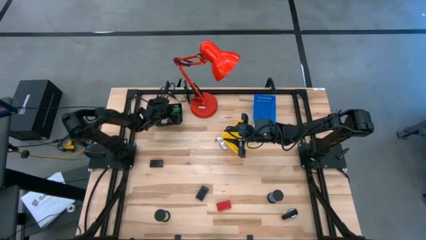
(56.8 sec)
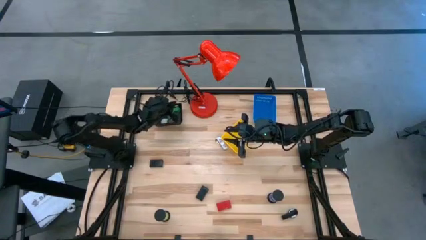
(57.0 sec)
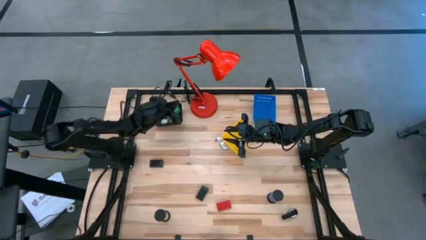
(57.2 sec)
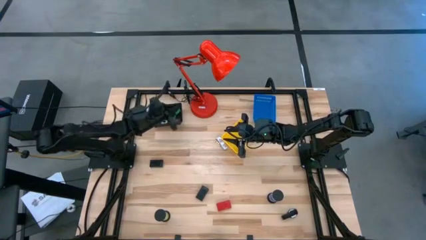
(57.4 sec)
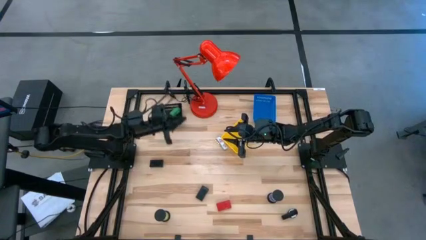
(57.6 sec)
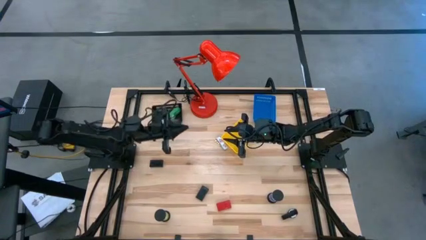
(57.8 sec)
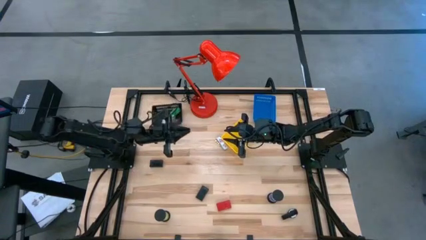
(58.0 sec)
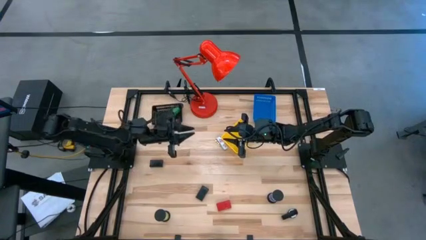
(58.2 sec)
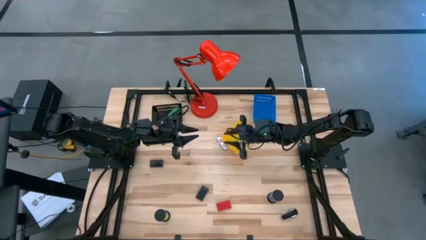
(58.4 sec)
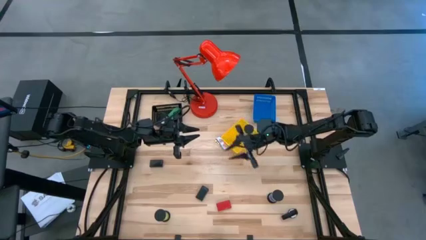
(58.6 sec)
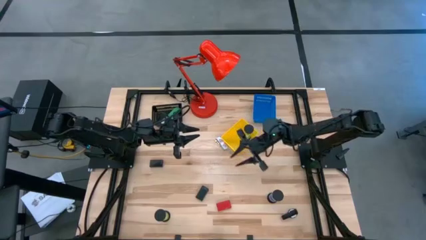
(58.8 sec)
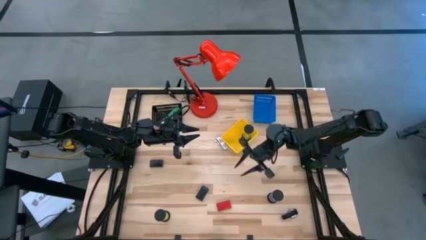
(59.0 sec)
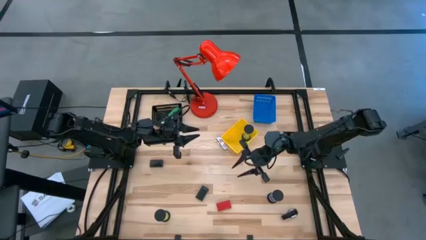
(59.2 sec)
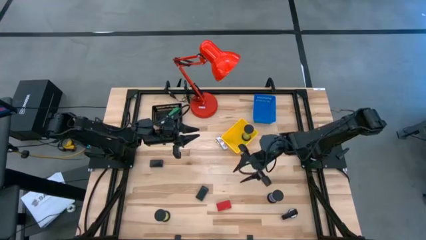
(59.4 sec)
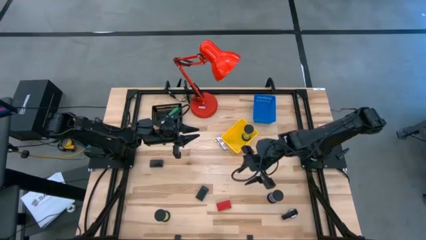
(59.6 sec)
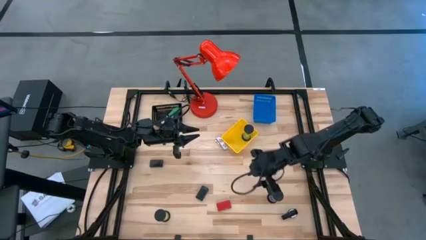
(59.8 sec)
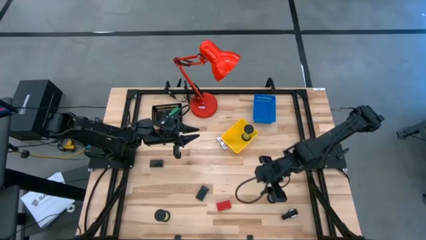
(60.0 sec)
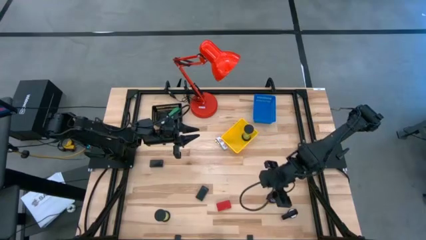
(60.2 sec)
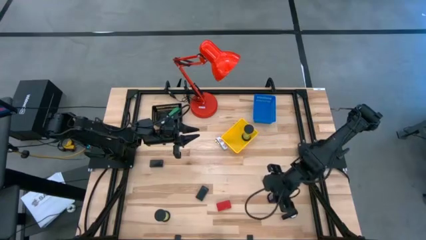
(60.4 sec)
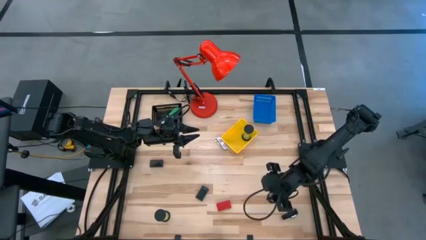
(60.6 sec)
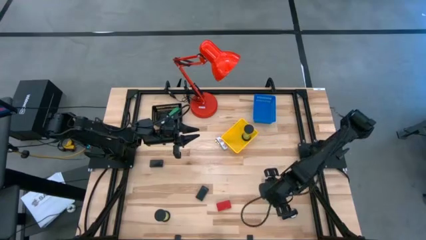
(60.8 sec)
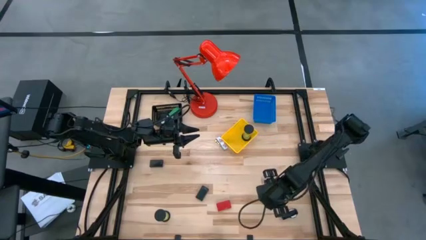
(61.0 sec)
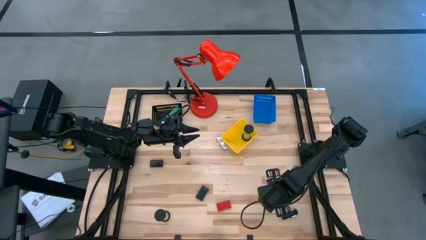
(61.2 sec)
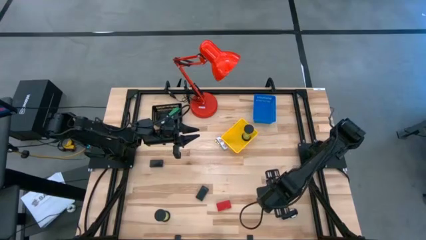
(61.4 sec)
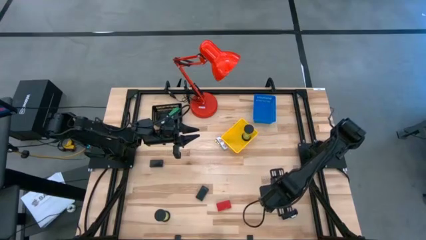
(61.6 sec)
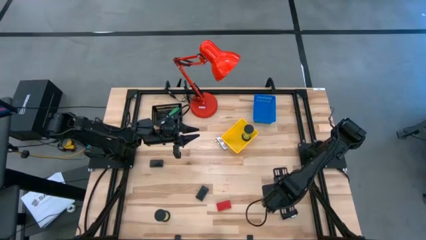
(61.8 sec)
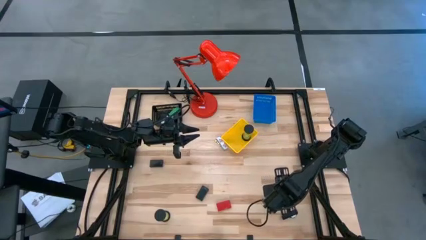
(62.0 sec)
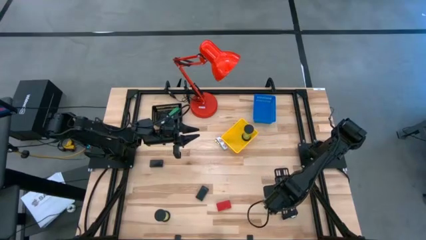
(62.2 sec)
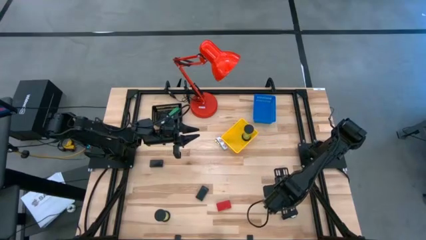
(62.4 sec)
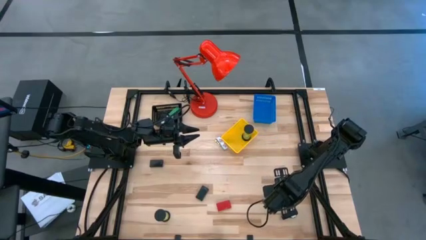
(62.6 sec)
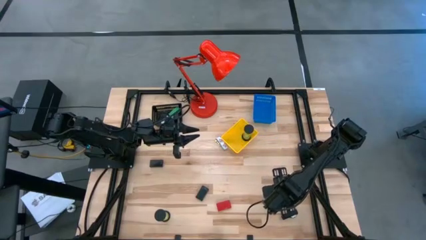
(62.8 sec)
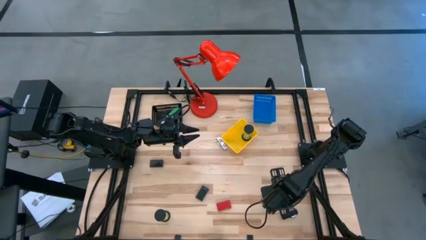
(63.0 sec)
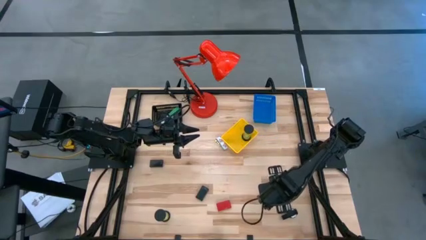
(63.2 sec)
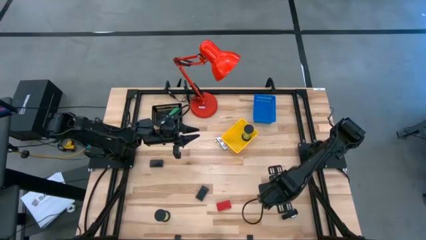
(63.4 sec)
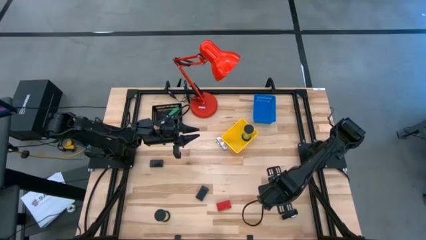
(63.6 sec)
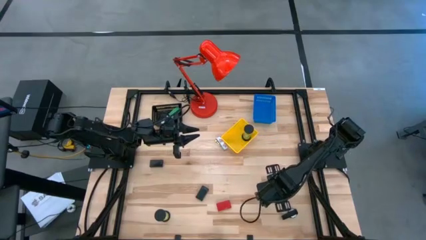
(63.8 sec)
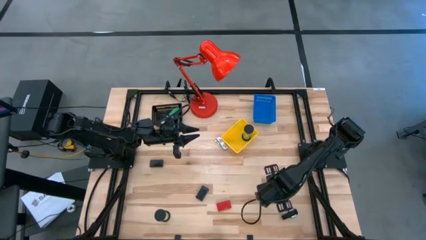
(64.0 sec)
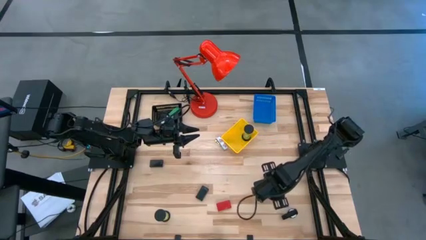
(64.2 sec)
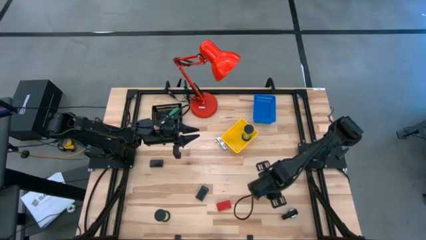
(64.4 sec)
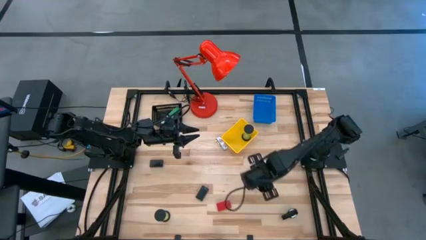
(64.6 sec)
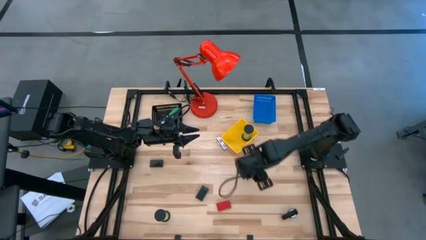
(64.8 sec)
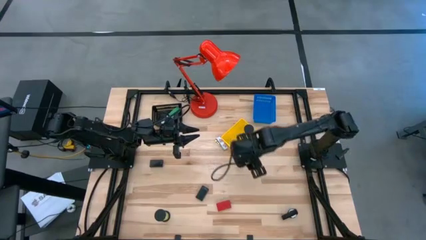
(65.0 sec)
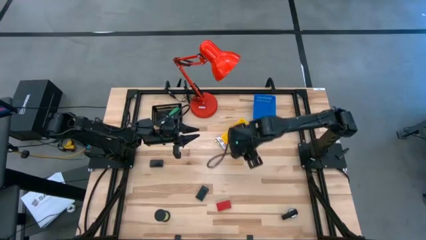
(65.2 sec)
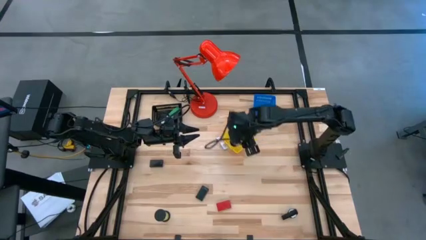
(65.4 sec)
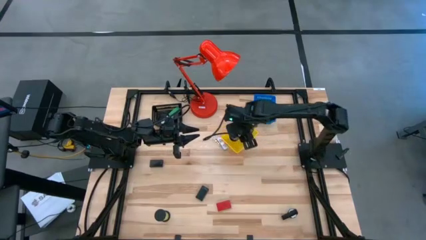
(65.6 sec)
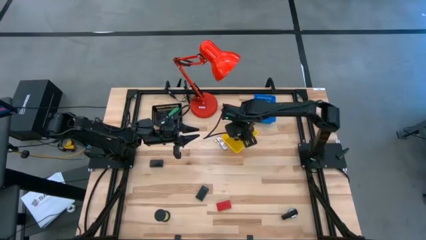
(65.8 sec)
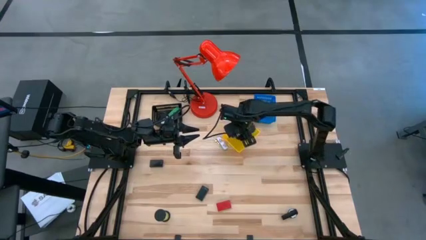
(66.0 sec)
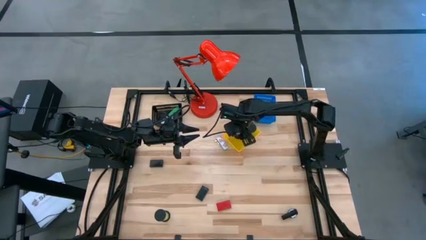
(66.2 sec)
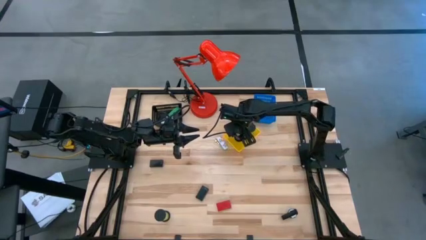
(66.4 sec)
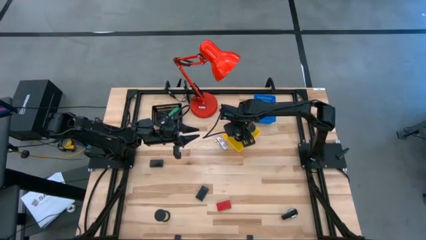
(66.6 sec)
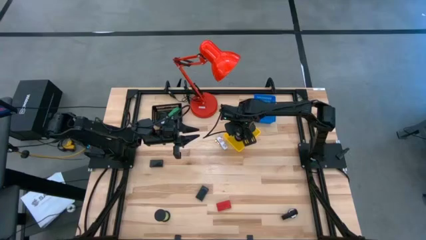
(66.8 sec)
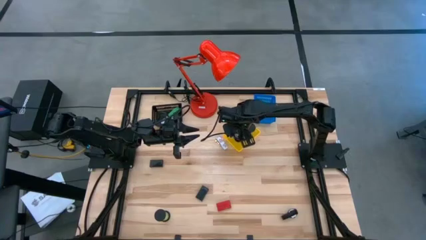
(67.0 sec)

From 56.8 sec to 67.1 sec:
Task: Pick & Place Office items
Put the blue hourglass into the yellow bin

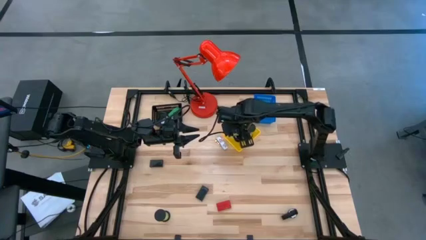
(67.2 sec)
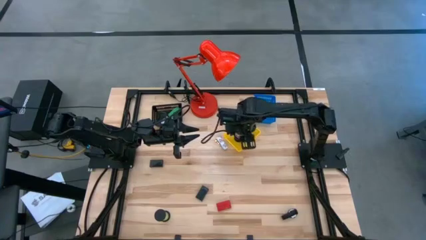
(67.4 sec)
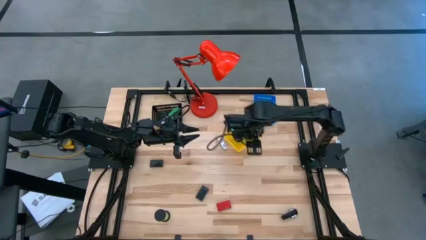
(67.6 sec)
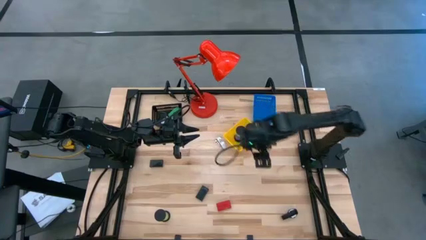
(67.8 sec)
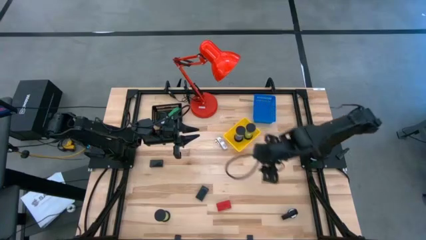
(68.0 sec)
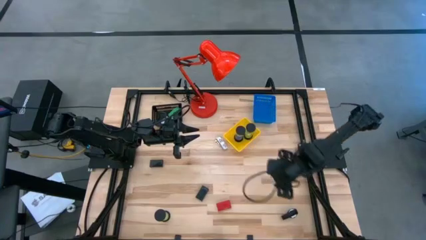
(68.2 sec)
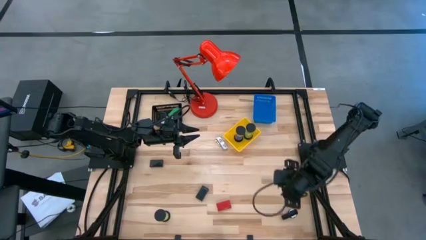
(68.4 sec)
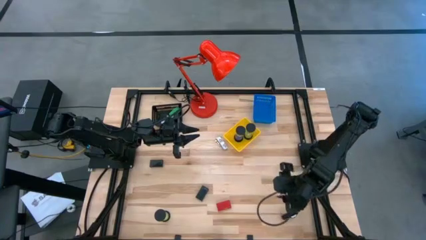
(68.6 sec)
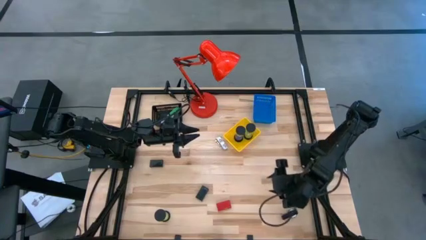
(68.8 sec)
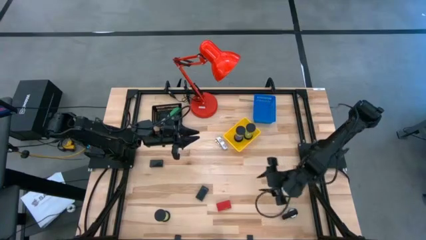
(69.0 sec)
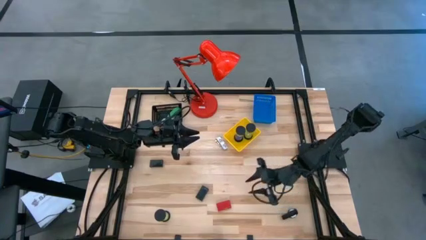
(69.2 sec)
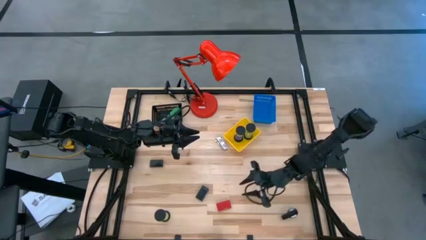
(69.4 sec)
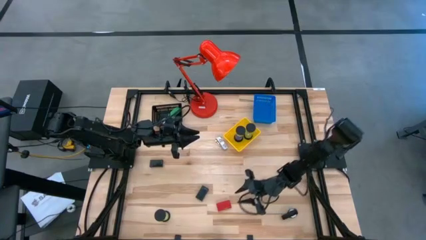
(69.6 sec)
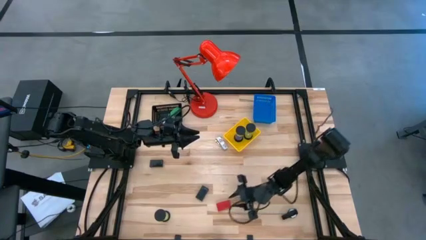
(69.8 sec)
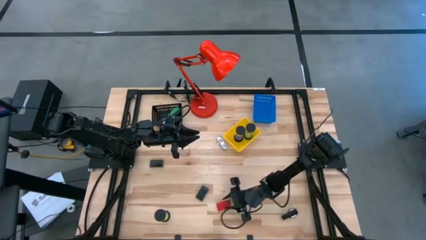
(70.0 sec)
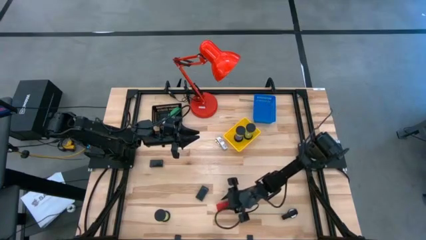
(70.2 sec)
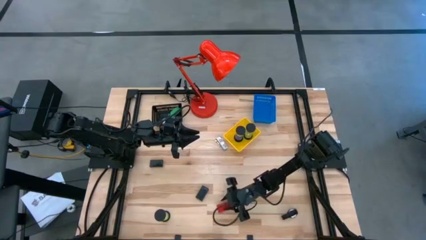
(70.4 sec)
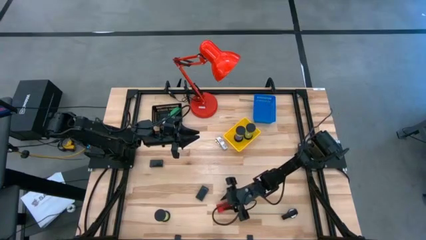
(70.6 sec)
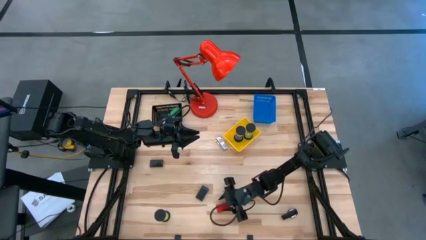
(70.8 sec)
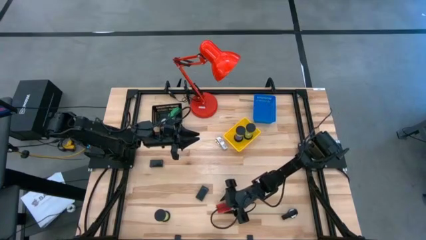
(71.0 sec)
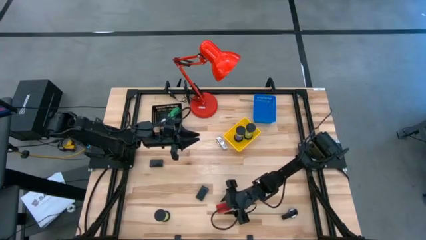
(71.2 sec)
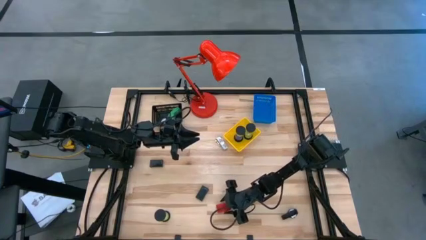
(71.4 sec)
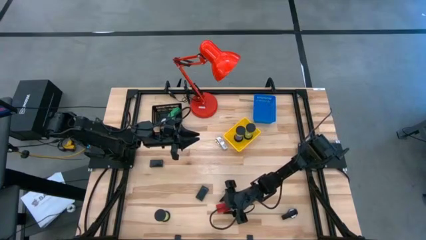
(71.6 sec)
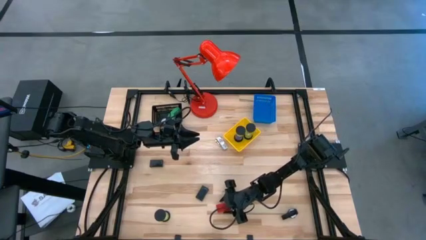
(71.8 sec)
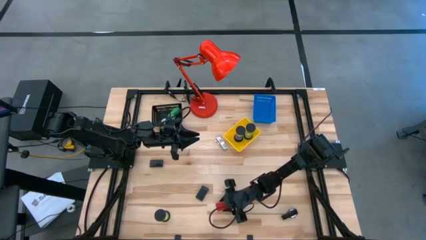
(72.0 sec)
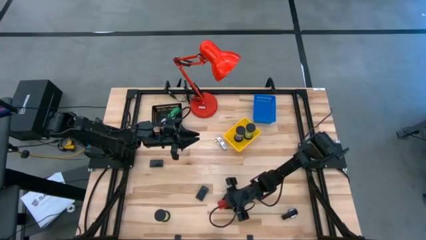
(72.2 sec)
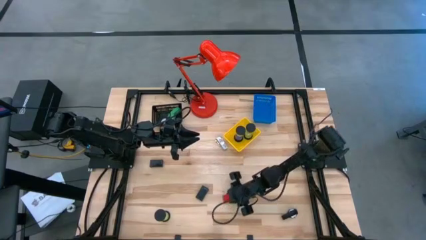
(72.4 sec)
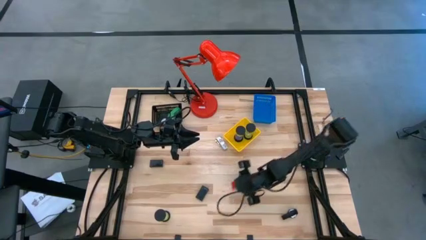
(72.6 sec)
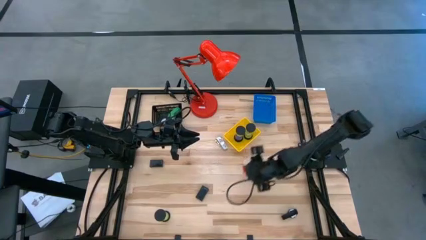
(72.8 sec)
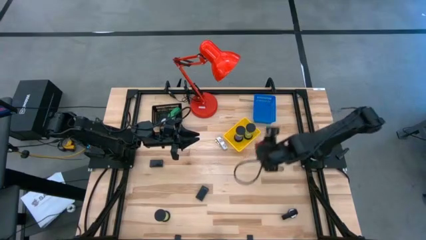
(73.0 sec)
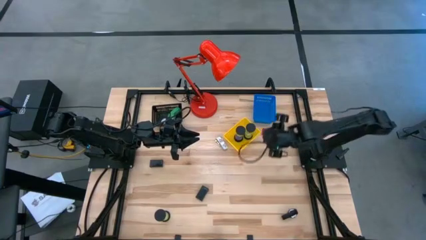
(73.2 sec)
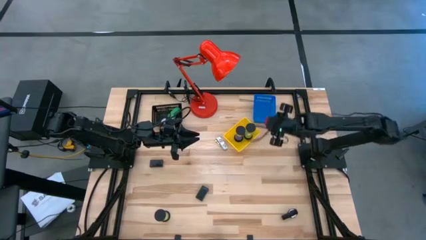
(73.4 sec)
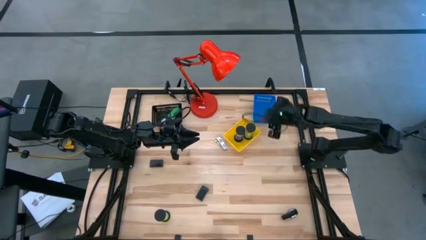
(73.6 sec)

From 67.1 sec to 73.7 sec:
Put the red digital clock into the blue bin
